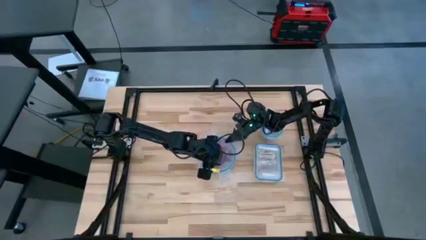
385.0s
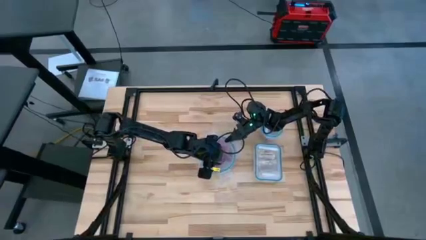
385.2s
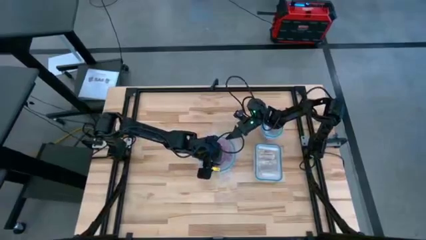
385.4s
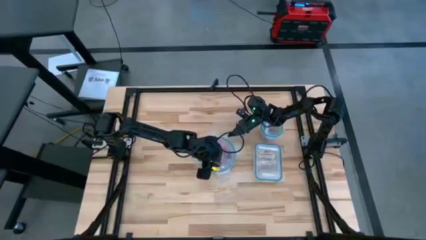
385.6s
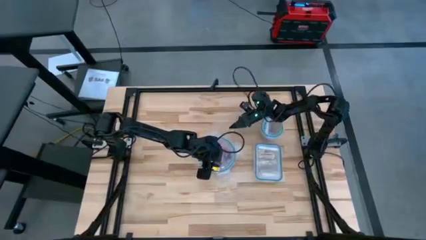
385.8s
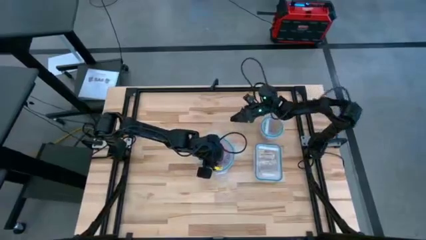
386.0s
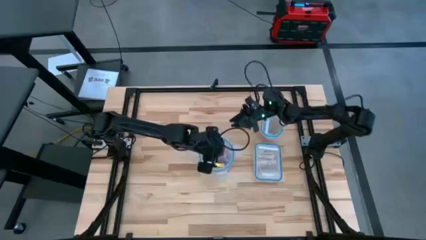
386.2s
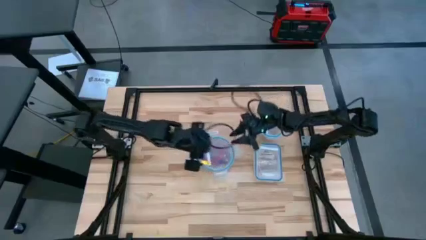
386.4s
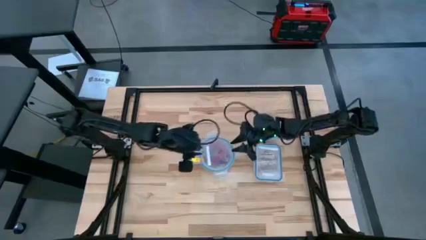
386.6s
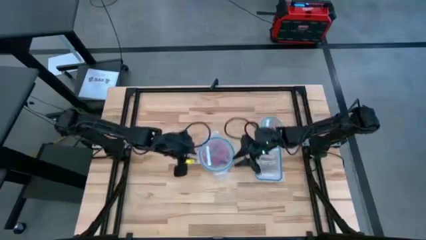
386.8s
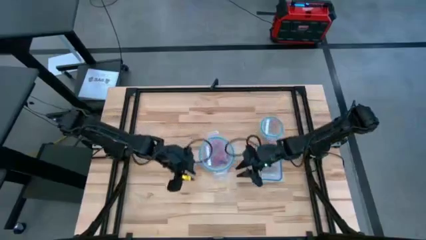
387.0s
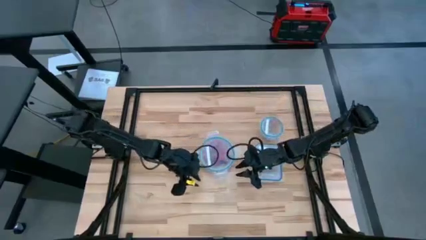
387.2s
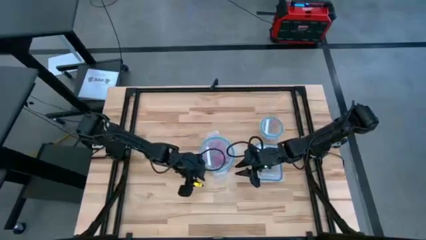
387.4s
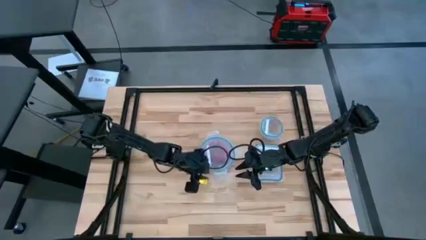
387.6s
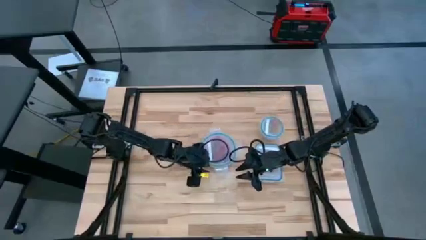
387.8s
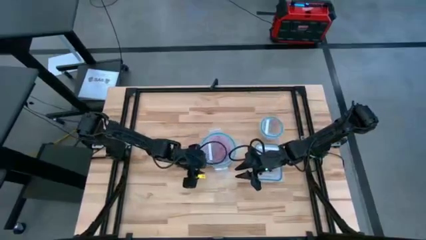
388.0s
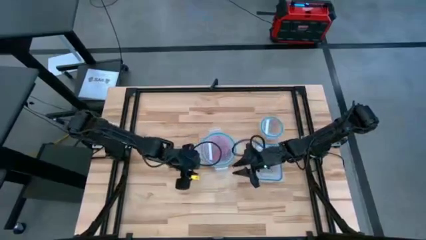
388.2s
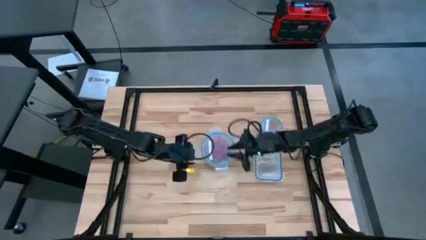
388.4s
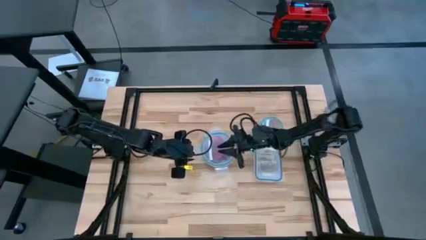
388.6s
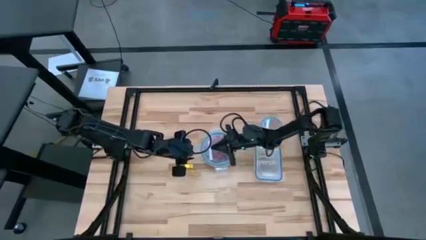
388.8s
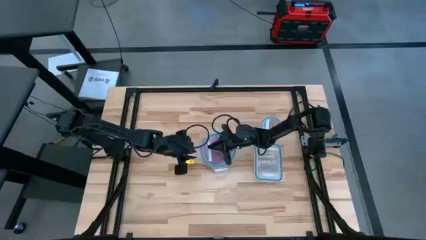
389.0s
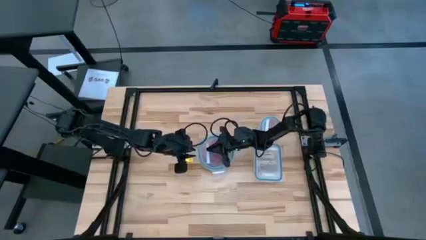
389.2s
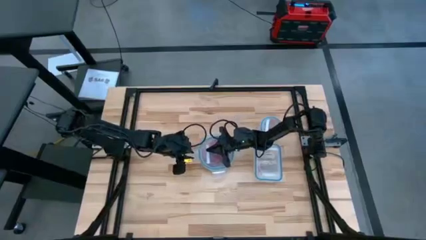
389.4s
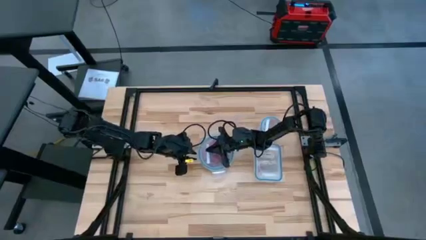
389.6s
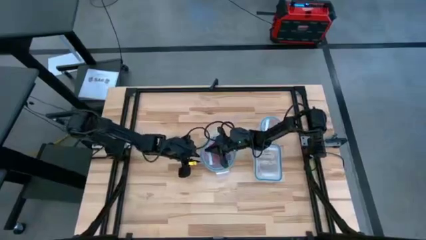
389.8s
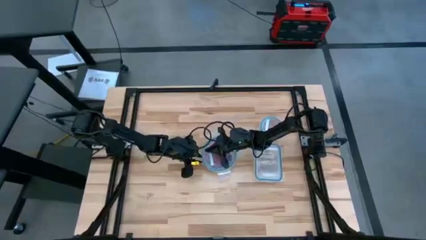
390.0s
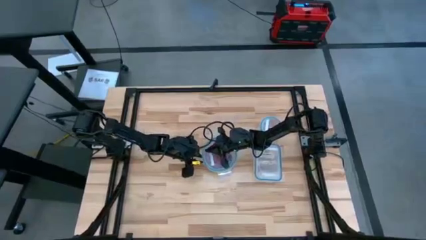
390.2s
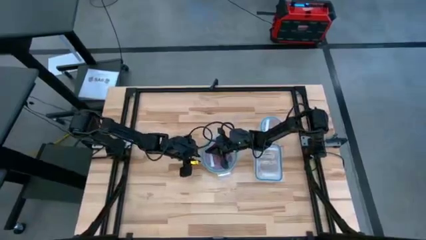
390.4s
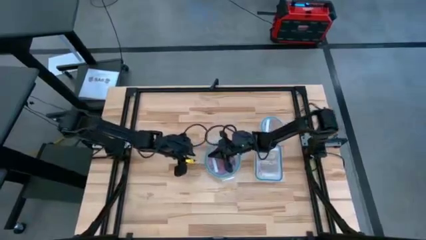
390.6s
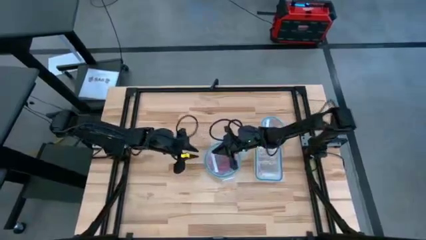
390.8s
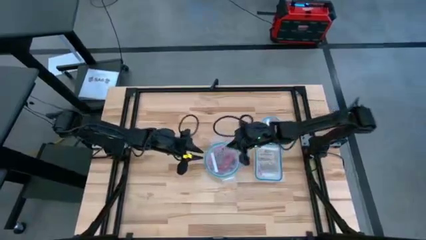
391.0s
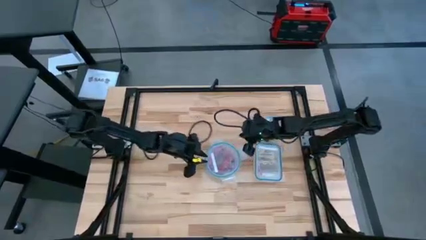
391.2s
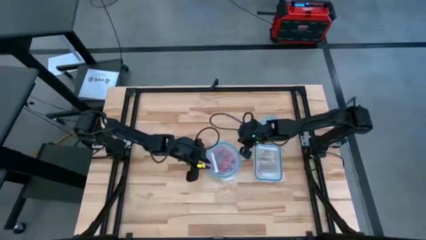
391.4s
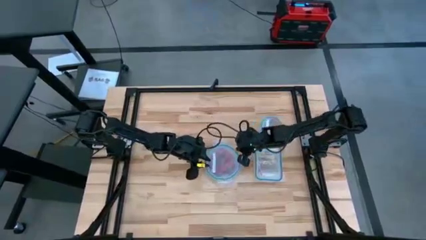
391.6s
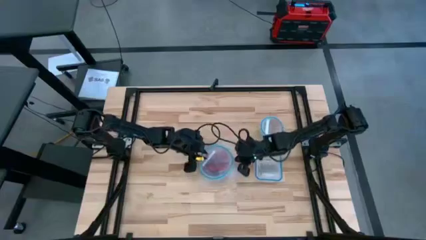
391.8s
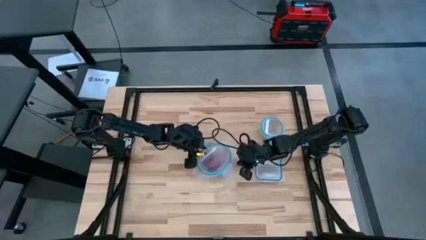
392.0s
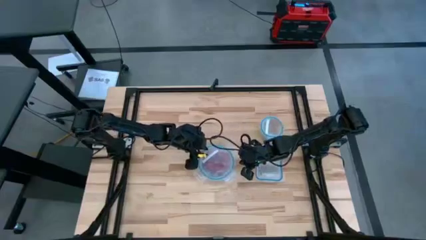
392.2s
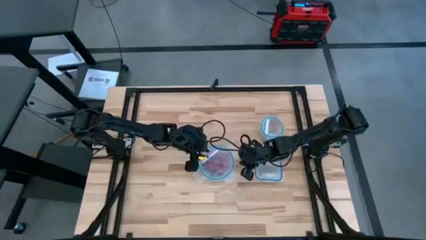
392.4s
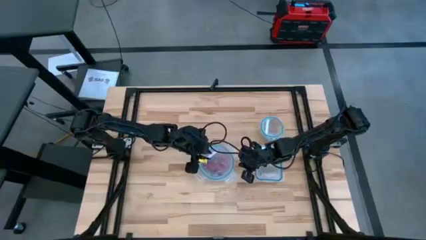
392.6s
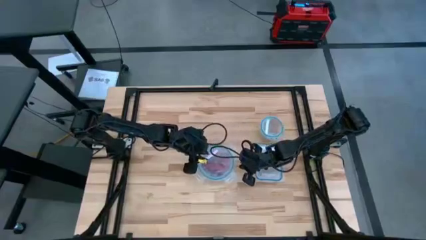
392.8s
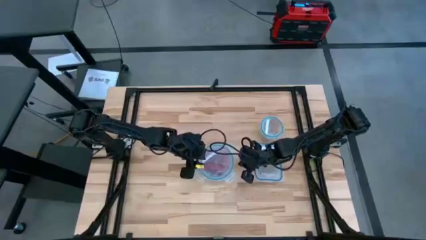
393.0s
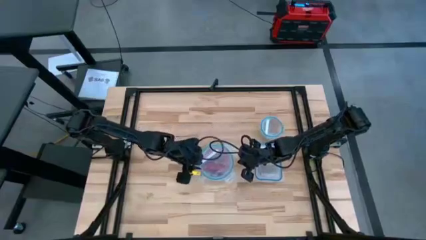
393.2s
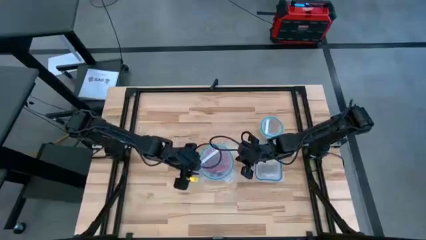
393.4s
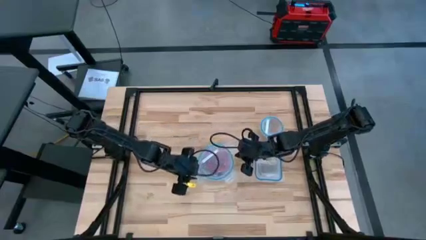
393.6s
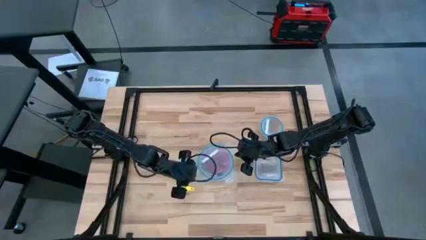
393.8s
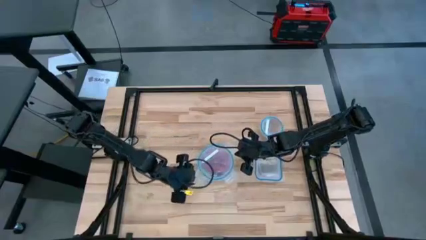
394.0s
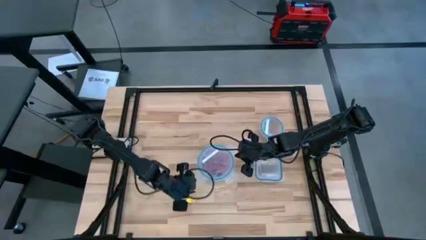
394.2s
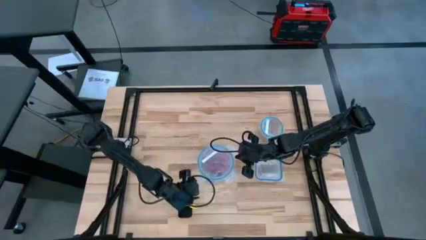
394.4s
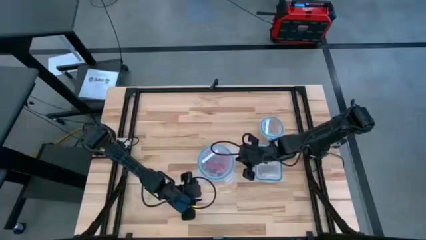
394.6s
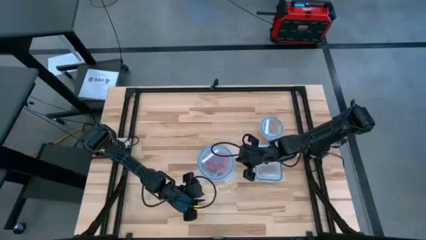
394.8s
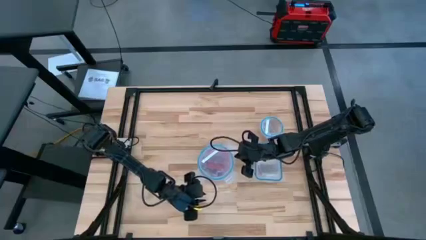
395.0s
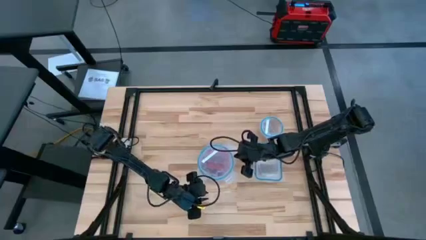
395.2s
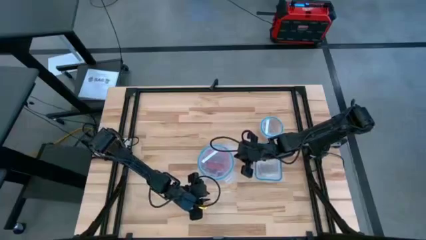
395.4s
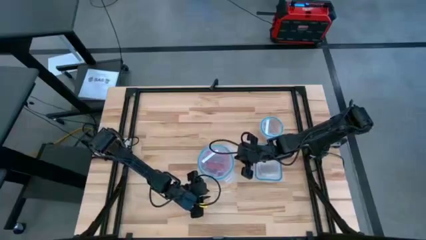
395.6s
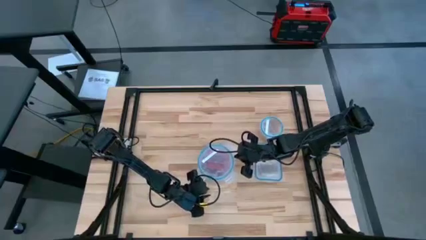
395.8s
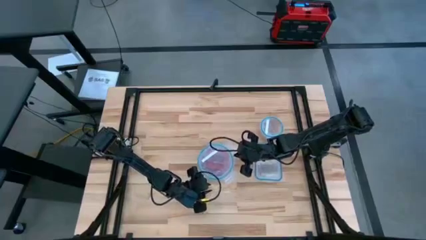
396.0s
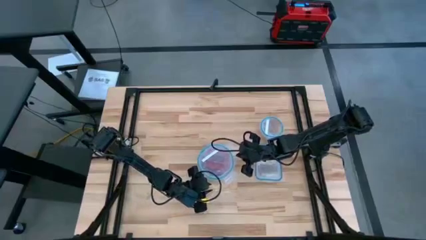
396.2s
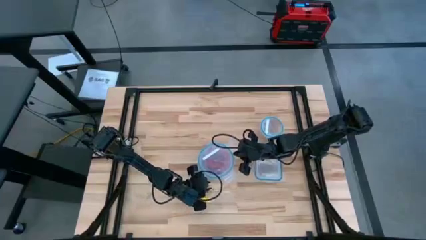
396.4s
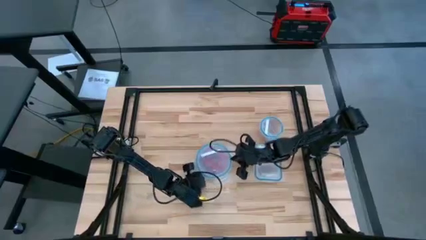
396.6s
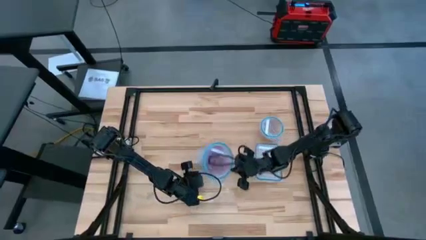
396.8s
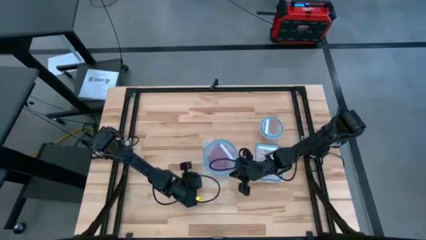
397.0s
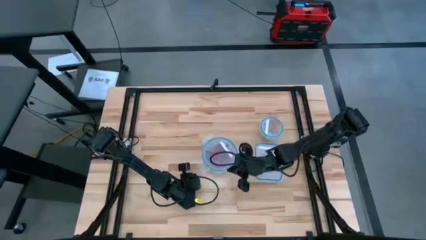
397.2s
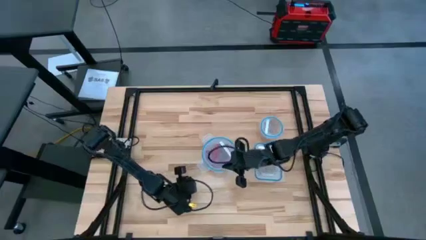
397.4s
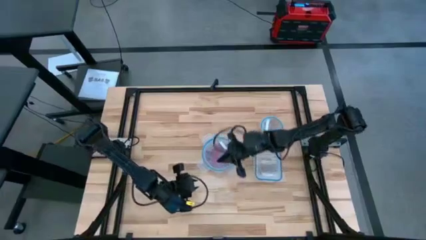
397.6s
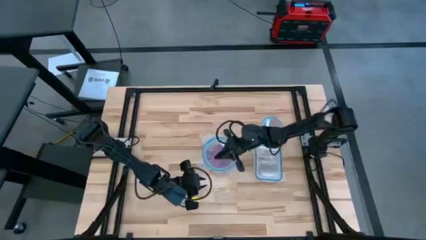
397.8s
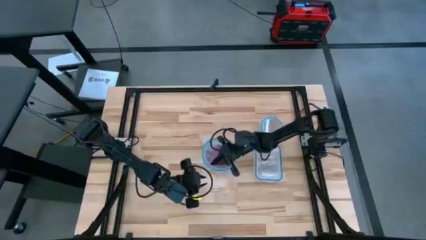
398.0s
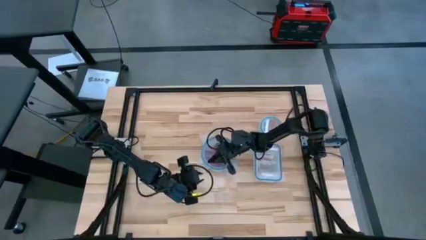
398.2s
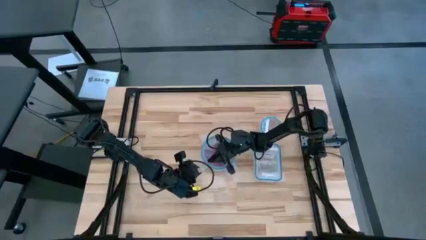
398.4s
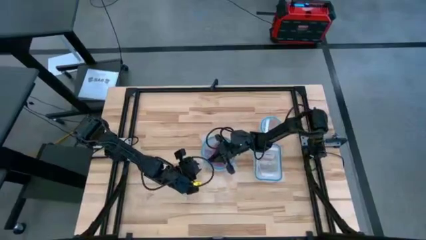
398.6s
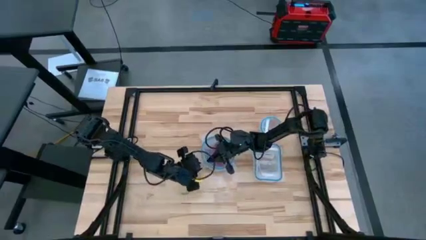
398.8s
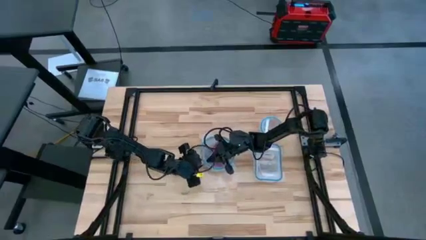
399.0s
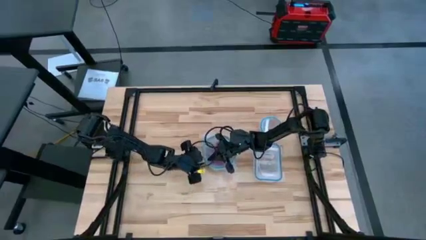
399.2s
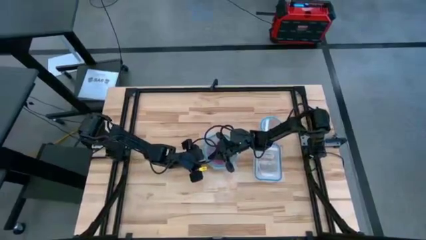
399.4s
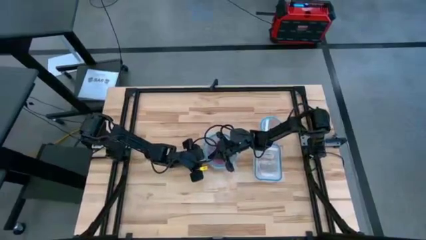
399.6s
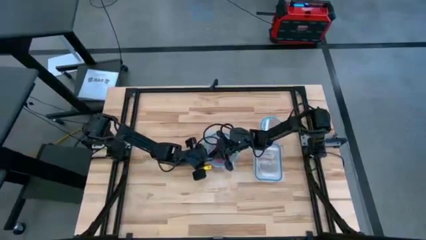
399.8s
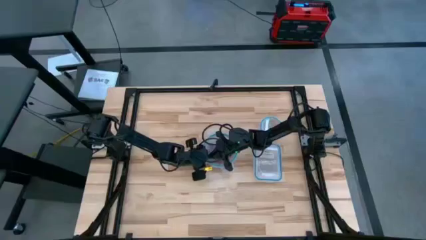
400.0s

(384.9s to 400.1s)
Task: Sort candy
Close the big circular transparent bin
